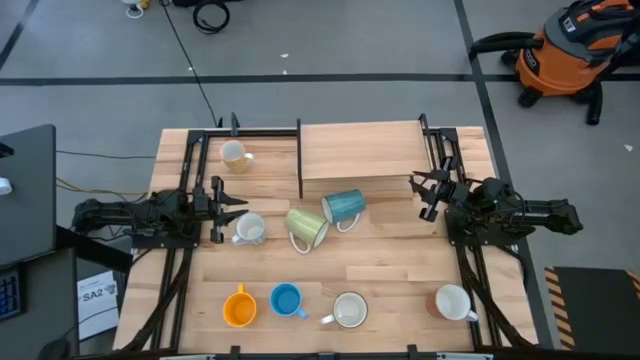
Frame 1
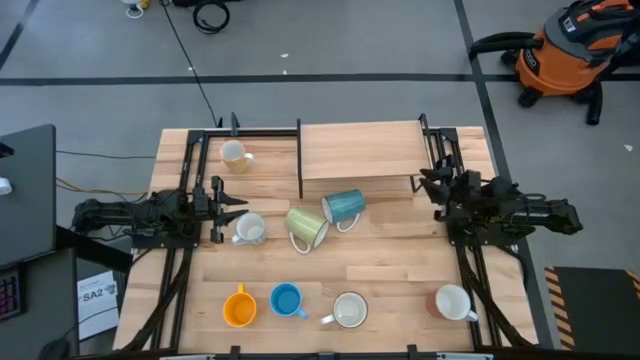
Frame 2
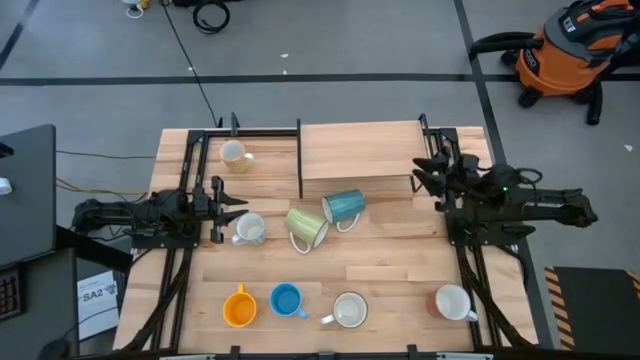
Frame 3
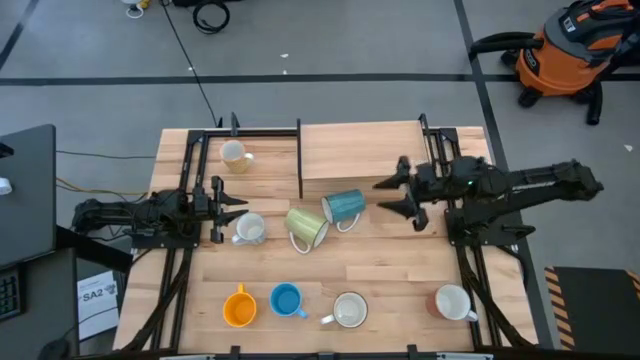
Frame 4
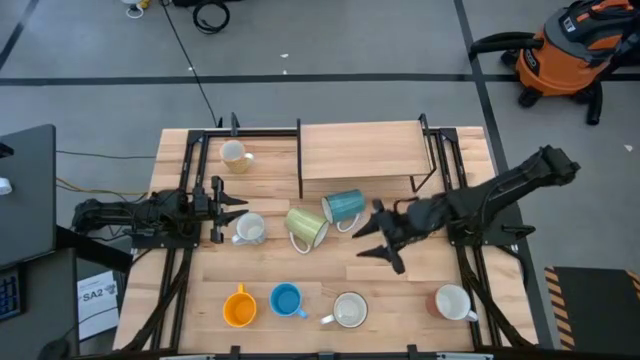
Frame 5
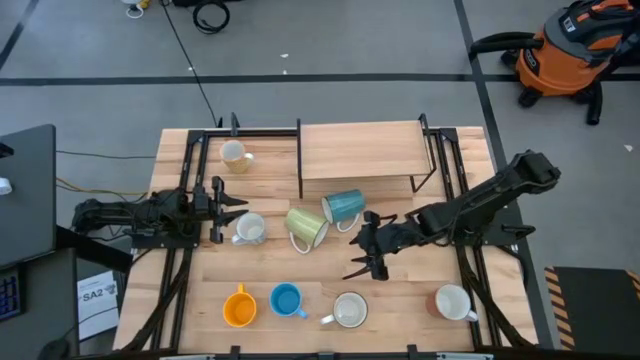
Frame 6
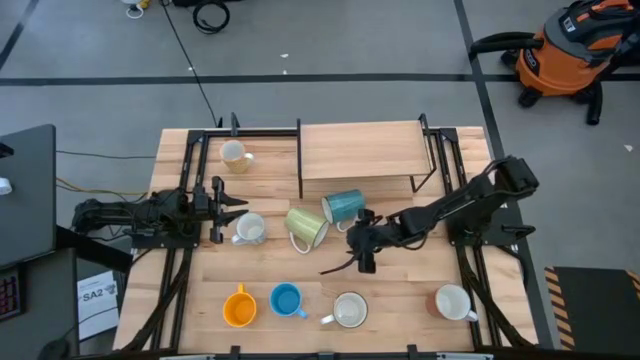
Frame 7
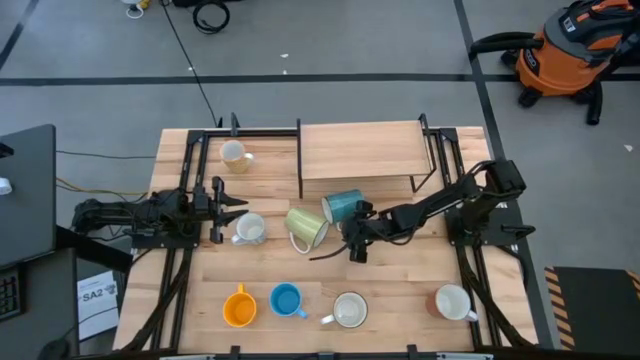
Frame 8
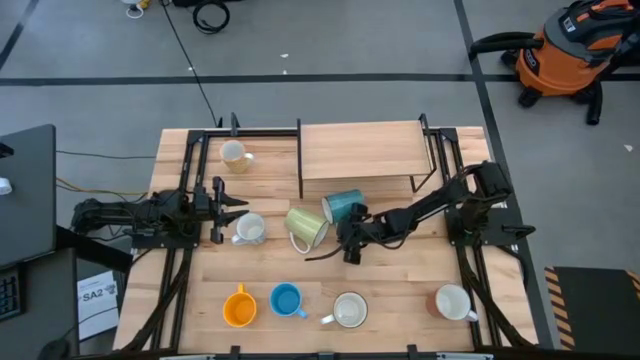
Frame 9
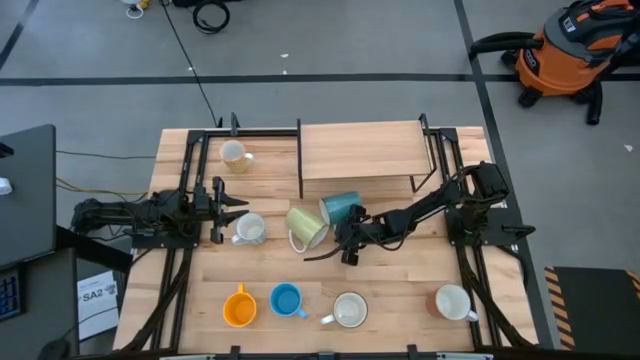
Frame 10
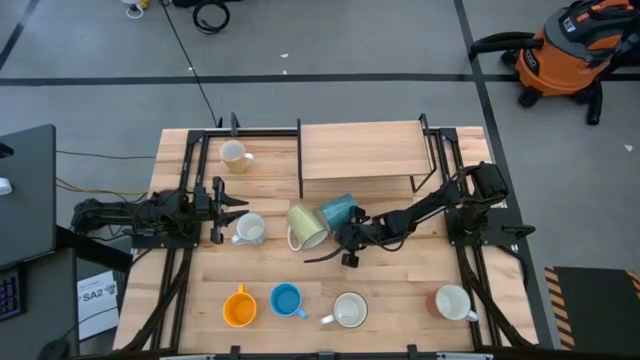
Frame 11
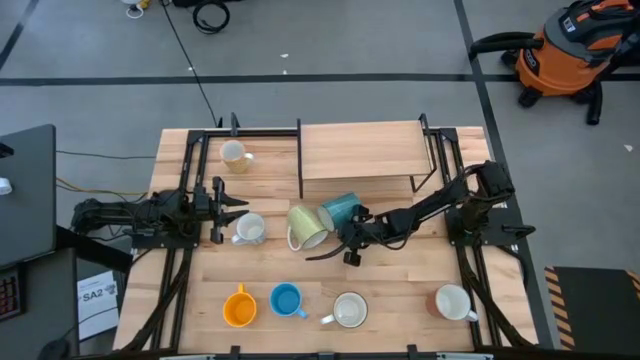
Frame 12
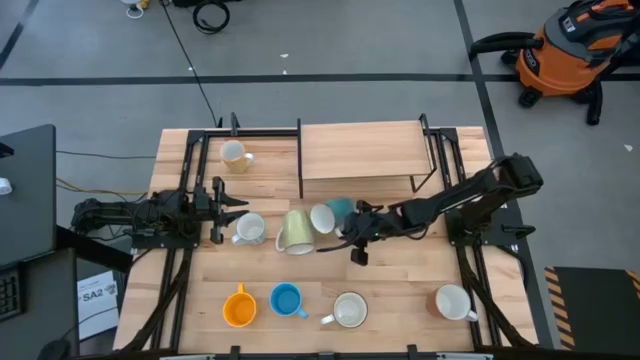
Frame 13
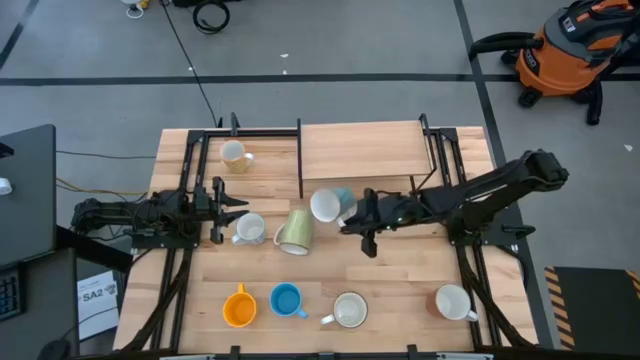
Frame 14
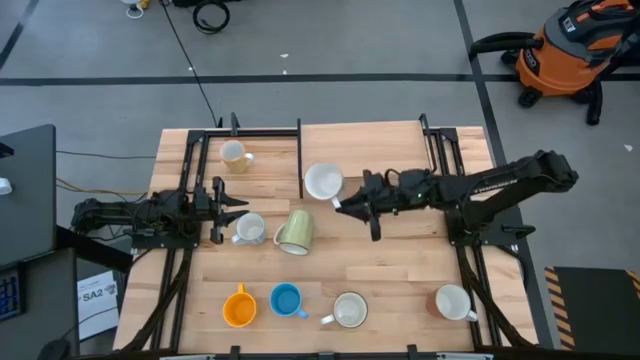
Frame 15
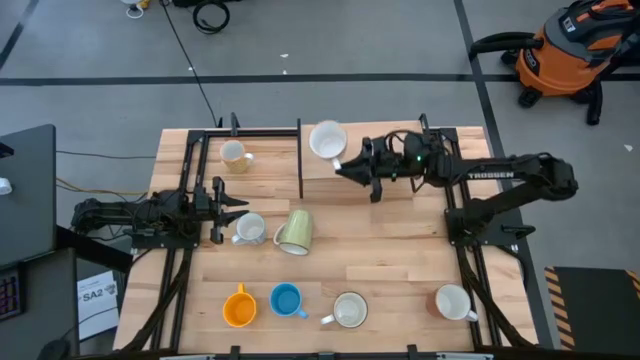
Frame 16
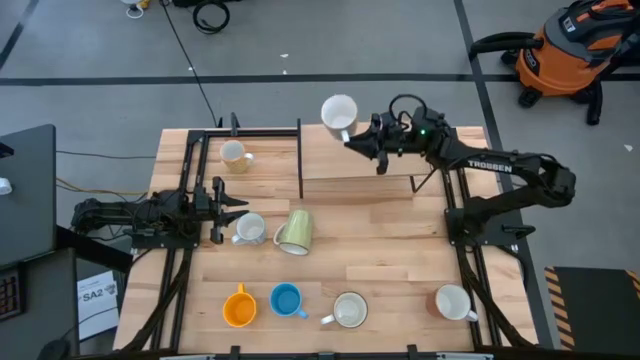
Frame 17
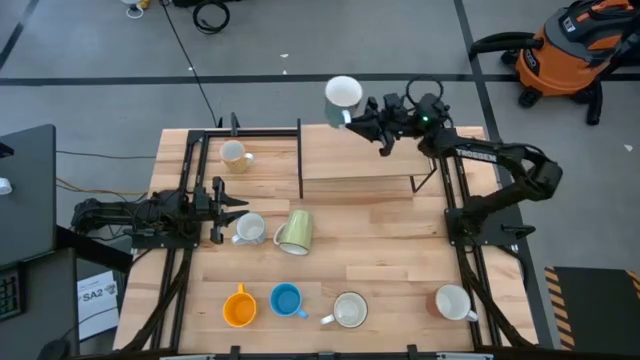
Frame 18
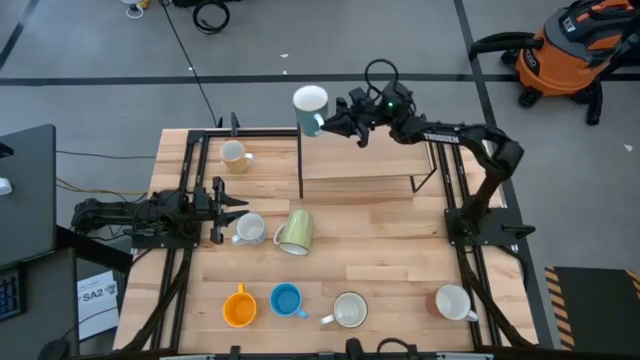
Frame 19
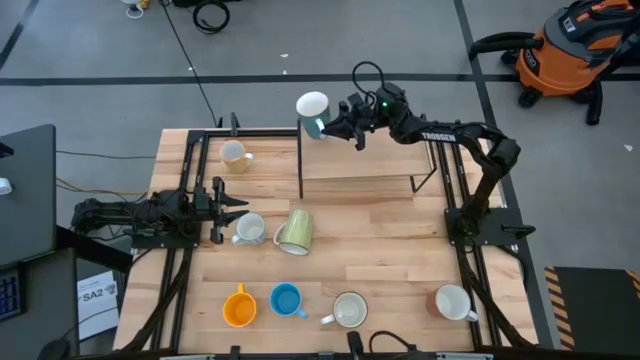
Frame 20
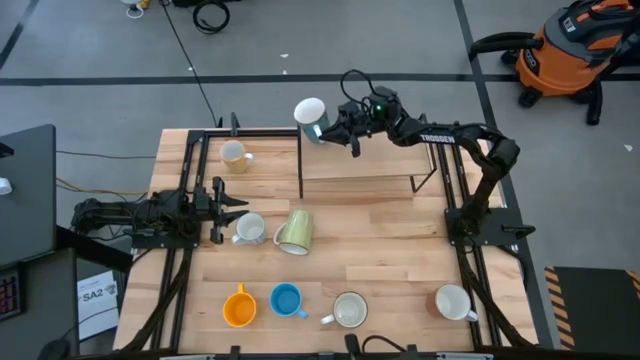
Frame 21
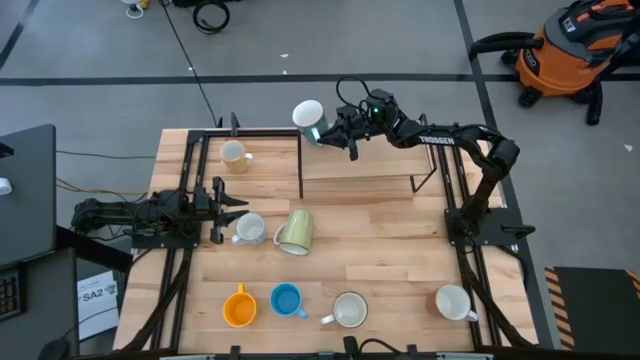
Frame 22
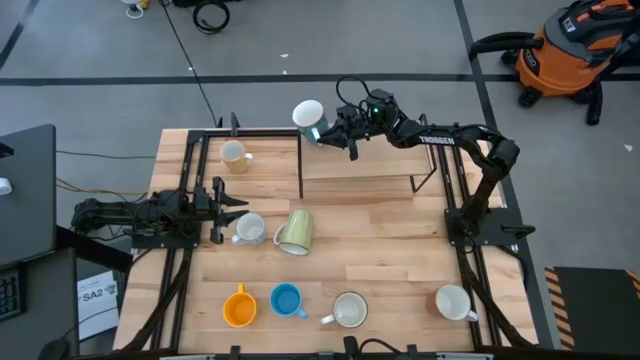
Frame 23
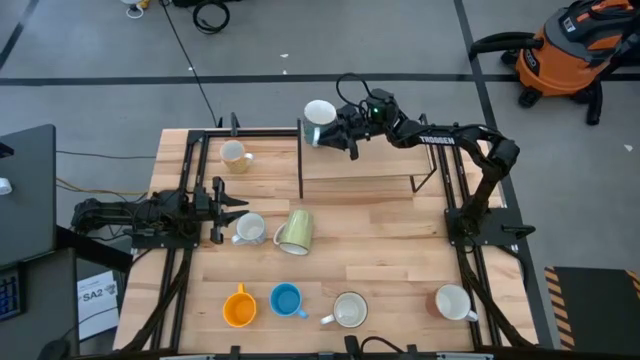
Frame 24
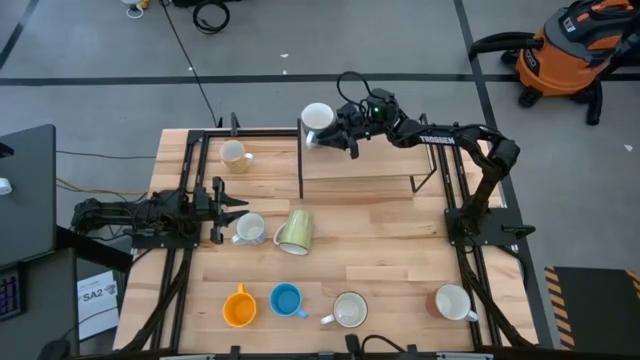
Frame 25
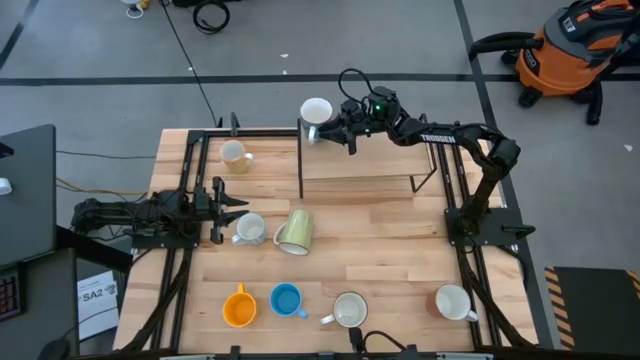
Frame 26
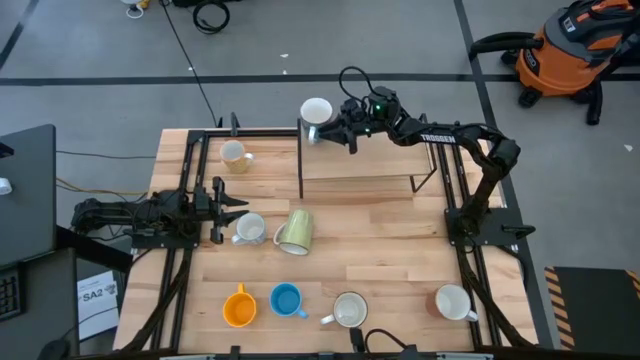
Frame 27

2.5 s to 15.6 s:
Task: Place coffee mugs
Put the top blue mug on the shelf

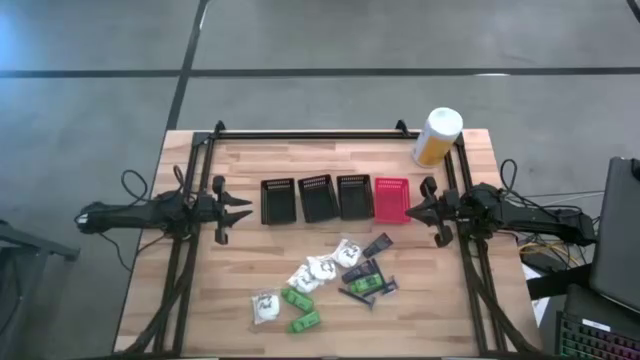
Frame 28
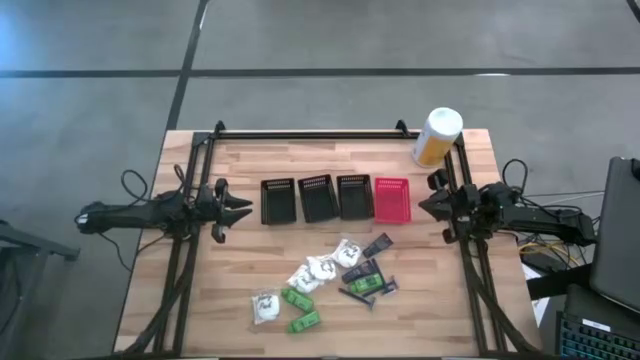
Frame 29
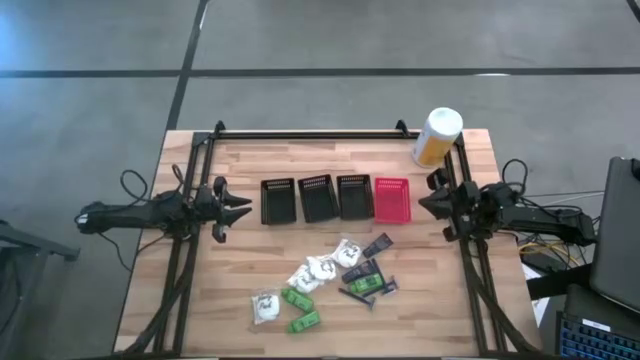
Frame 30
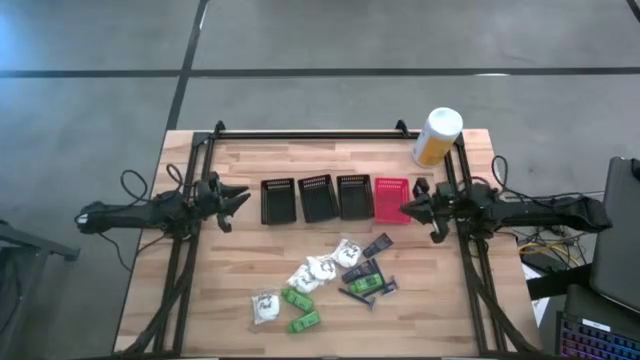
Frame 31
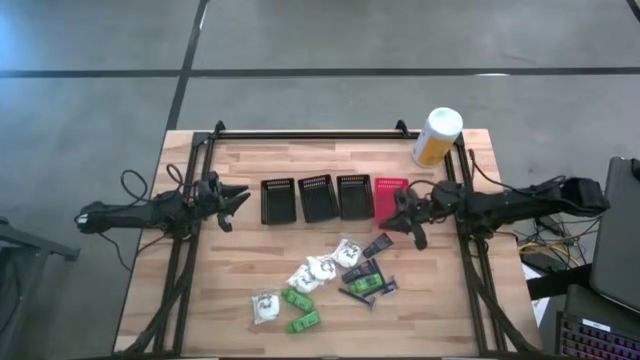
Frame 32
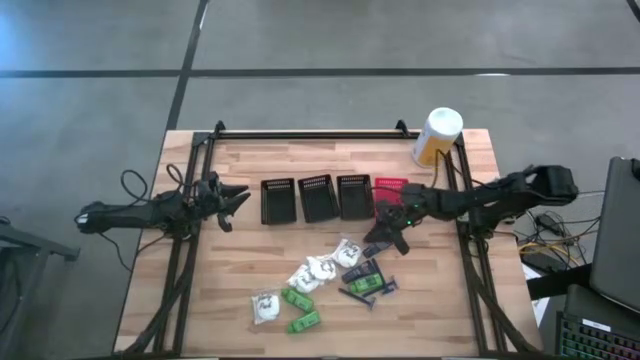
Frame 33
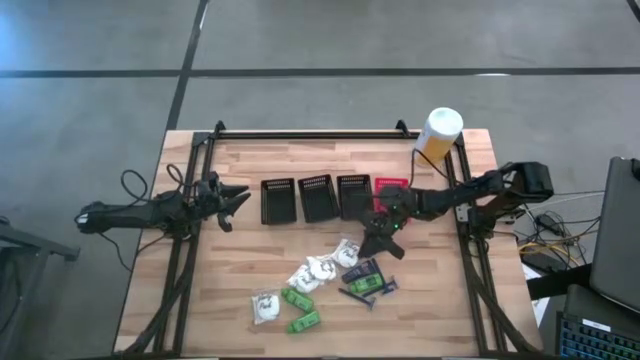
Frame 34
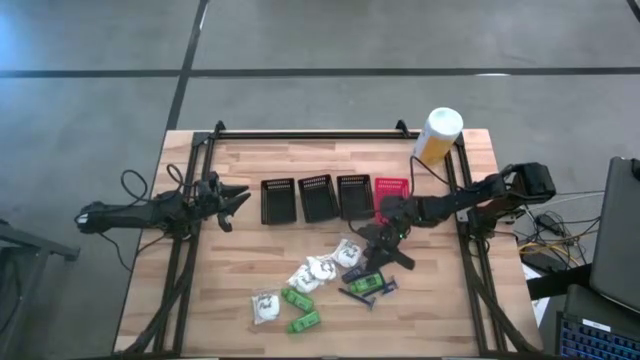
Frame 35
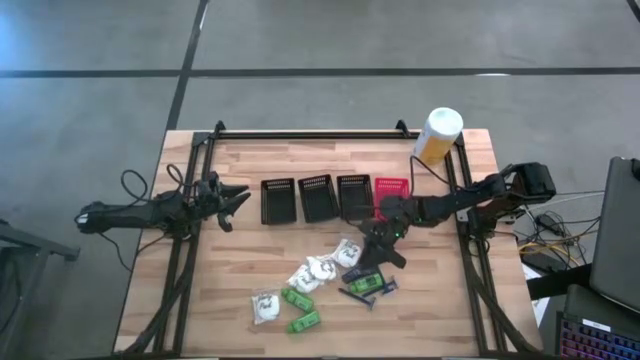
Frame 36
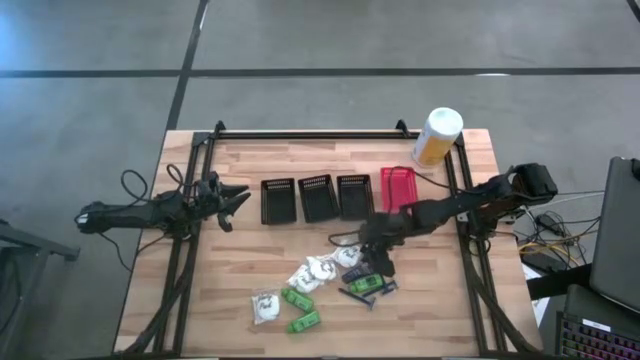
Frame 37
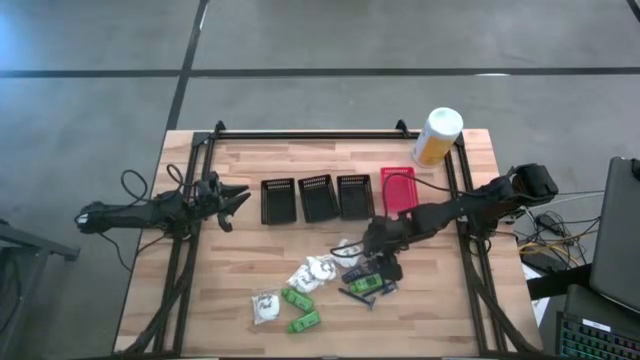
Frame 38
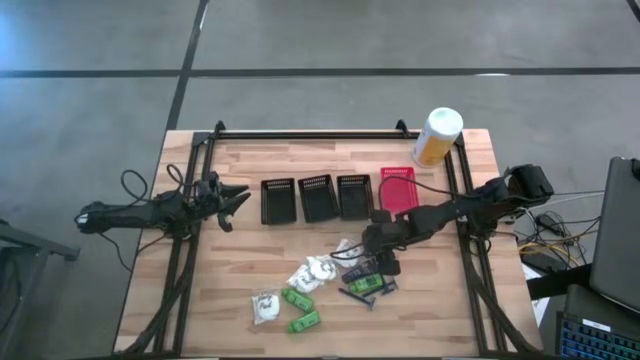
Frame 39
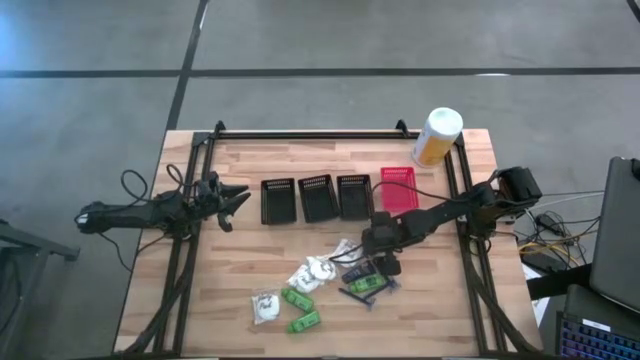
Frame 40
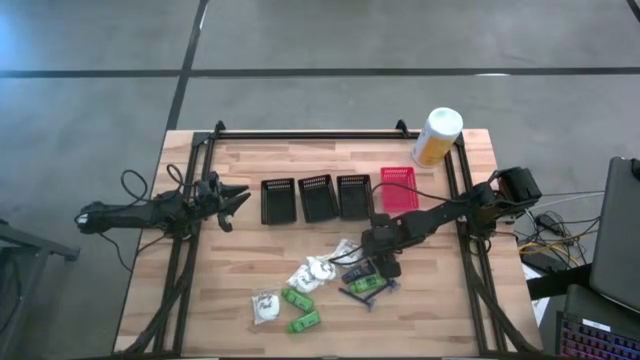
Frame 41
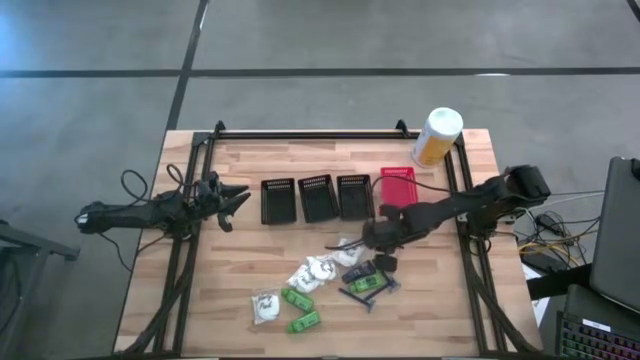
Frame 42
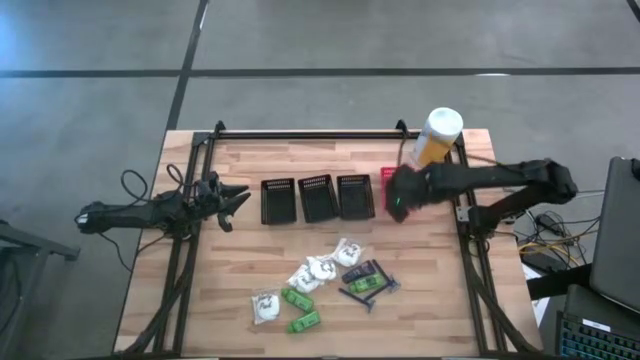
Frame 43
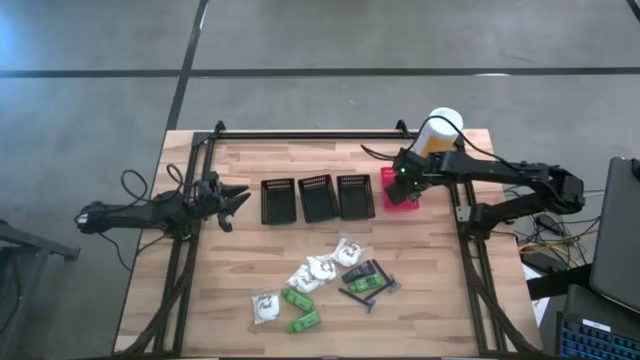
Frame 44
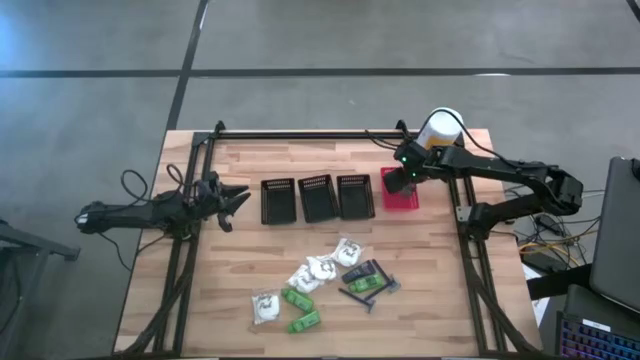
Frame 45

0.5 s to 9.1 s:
Task: Pick & Place Travel size toiletries
Put the top blue shave cream into the red bin
